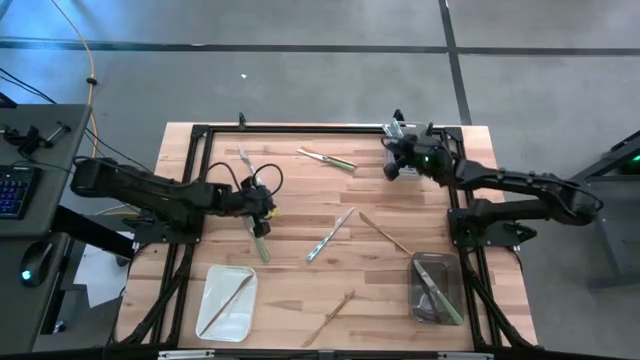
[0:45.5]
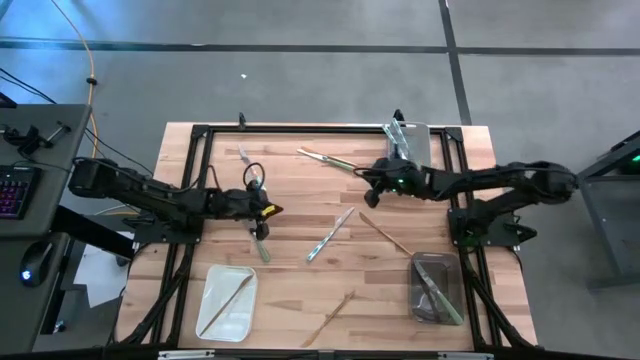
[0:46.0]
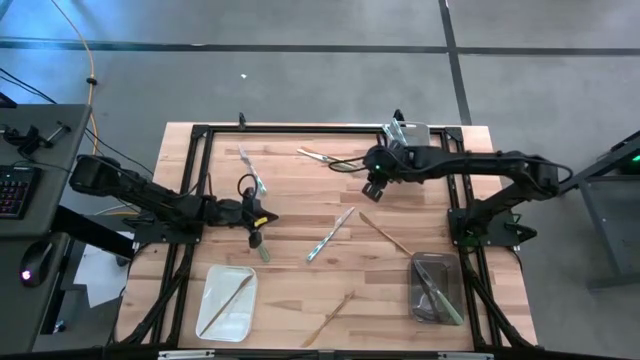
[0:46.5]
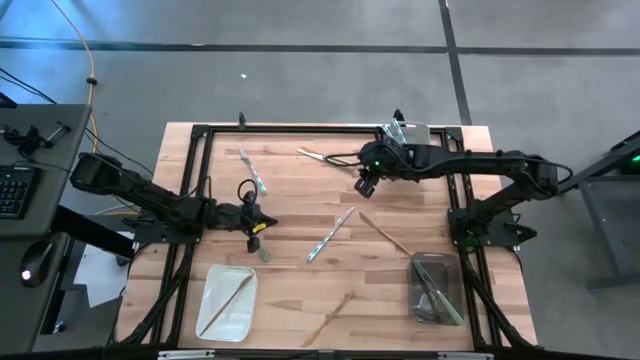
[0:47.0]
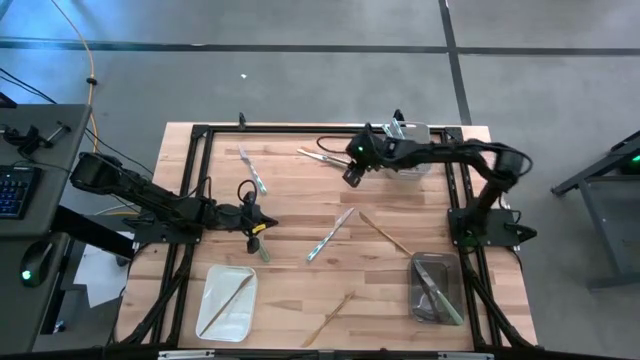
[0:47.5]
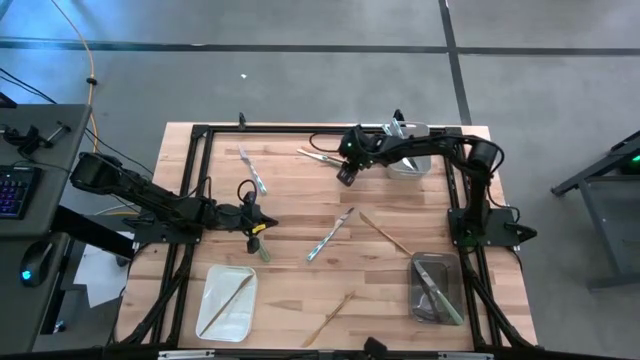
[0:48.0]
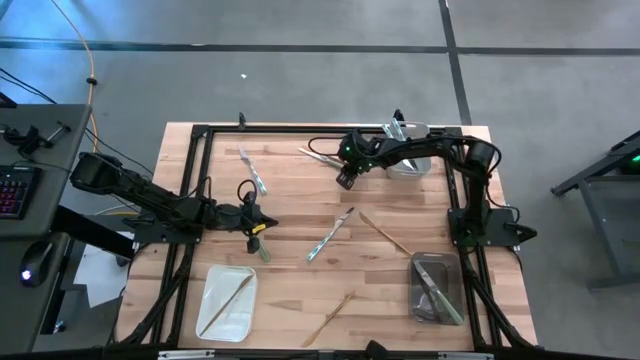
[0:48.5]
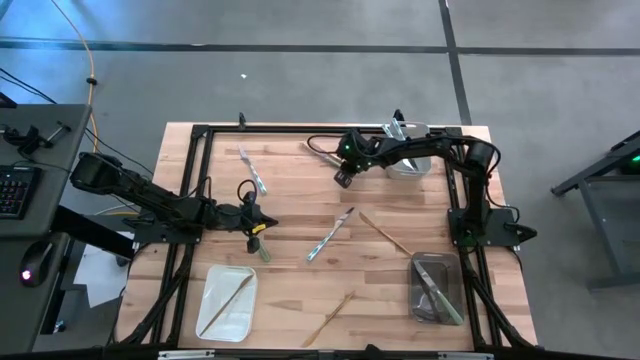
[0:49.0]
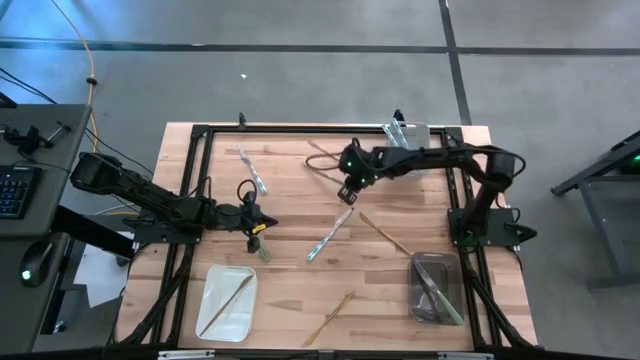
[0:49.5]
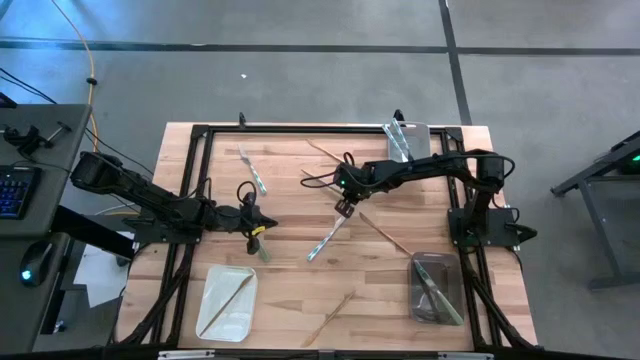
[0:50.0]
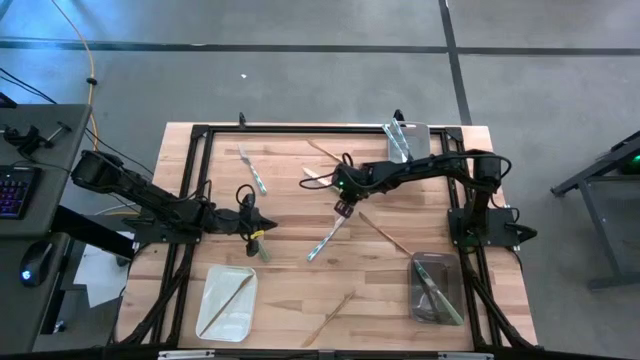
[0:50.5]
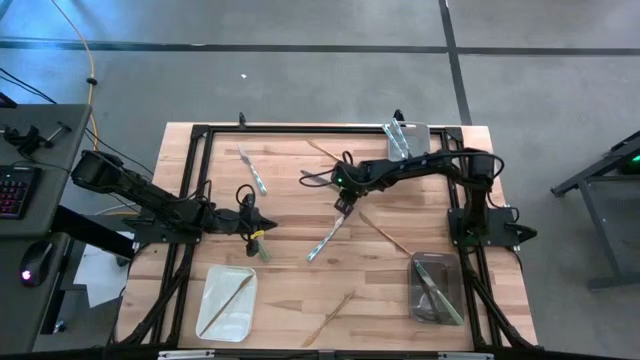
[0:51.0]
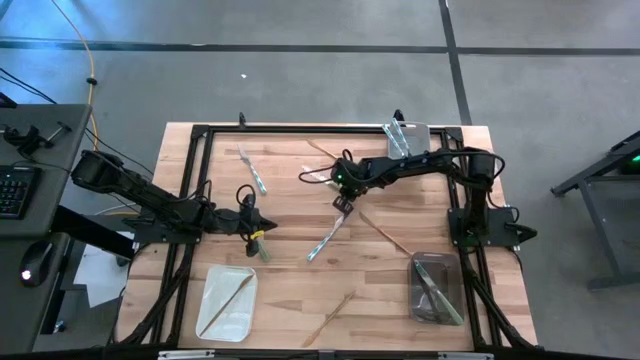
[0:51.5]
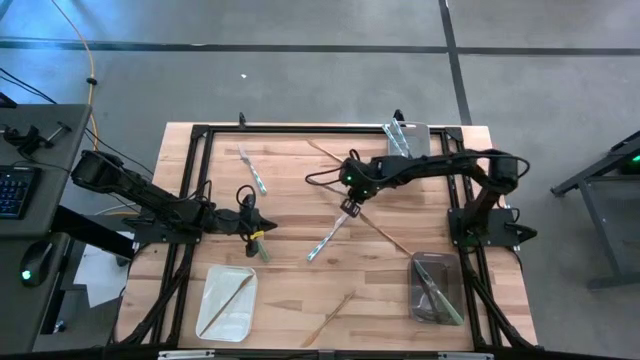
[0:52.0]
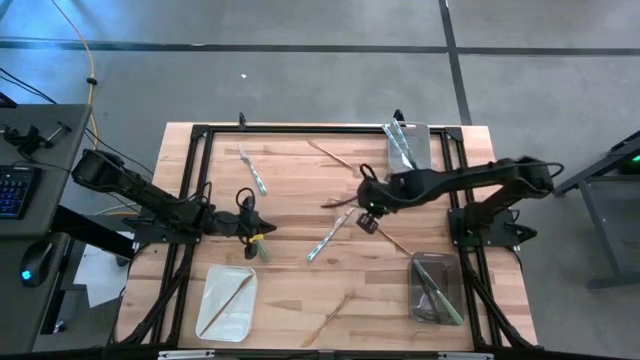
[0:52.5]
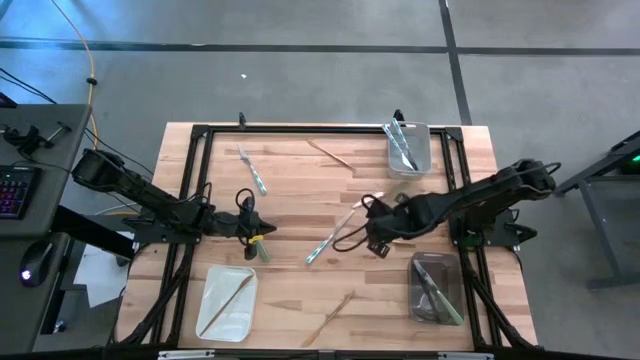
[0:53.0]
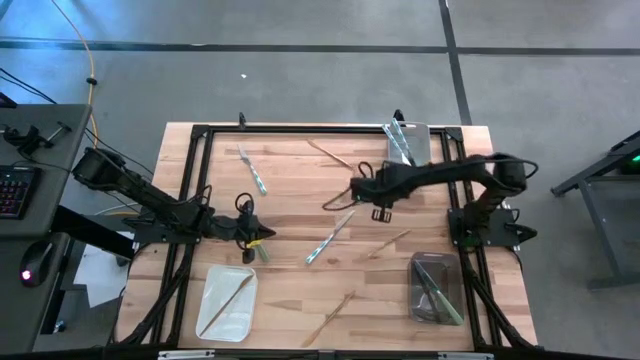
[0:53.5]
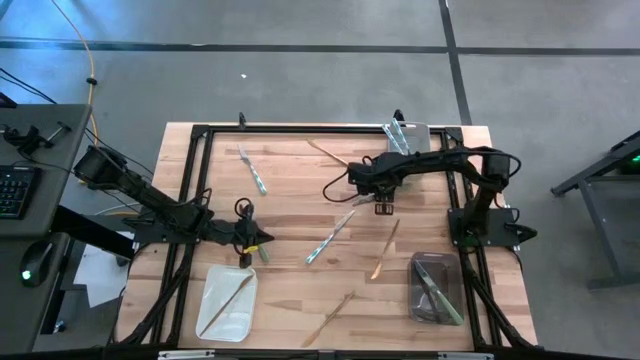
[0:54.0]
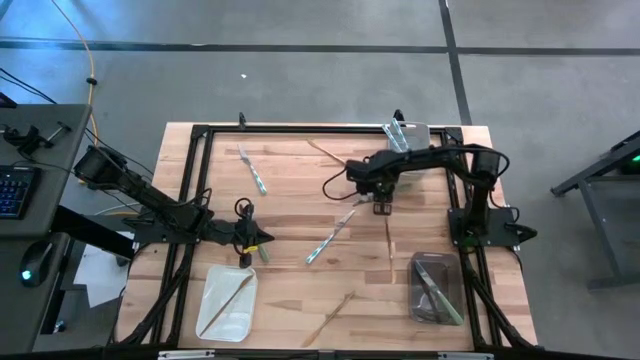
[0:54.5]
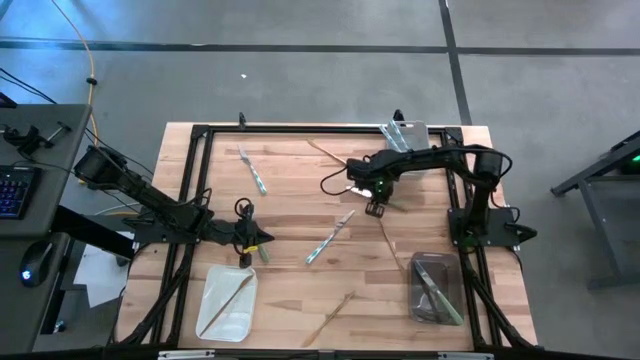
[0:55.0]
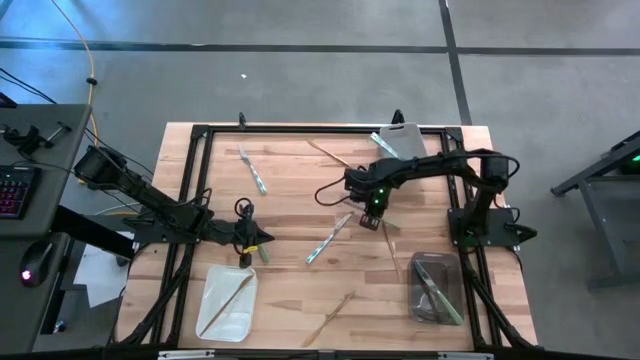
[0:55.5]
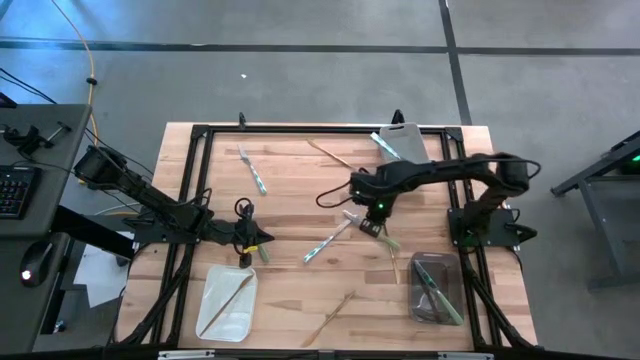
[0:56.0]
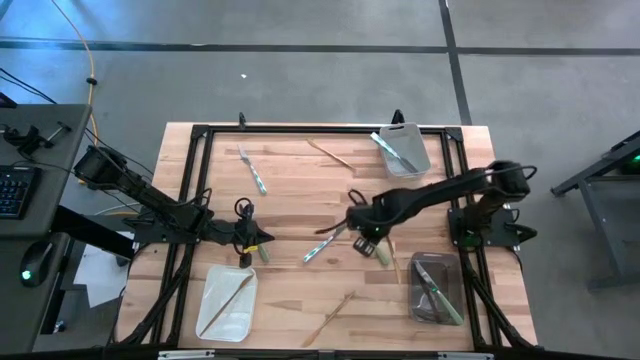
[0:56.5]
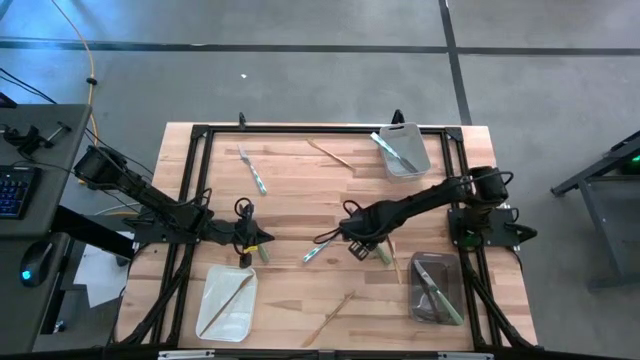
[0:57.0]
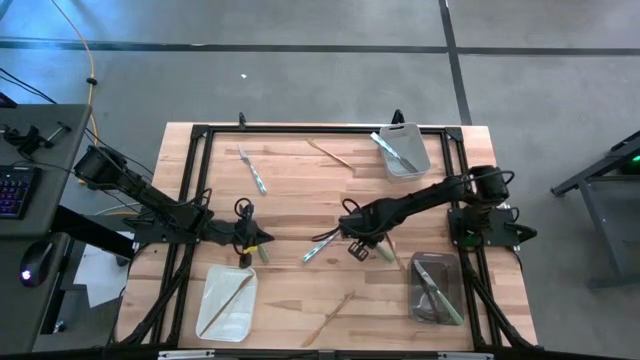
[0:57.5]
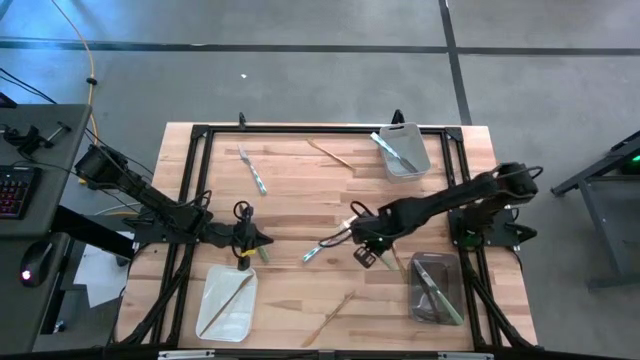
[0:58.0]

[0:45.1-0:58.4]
Task: Sort silverware by color (type)
Put the green table knife into the black bin

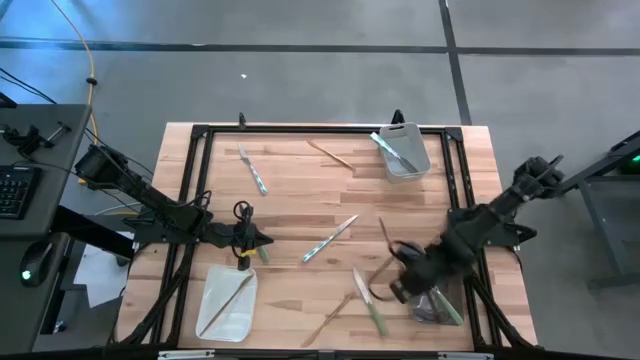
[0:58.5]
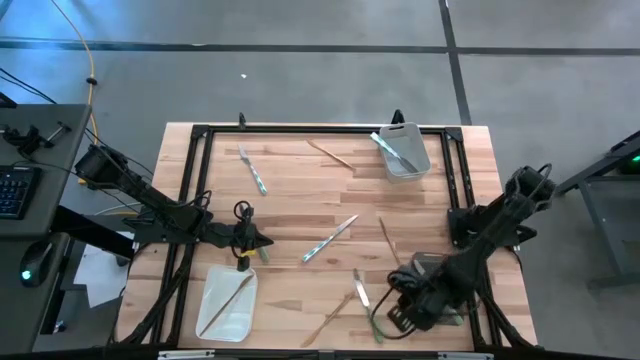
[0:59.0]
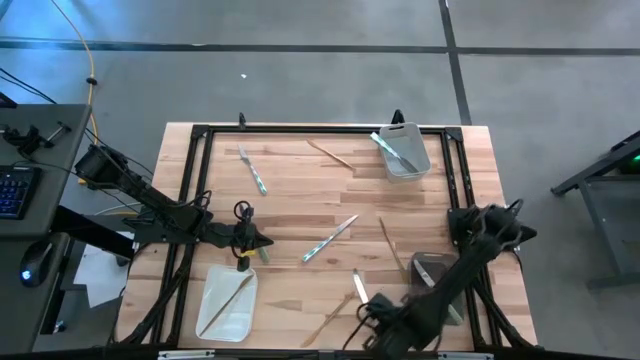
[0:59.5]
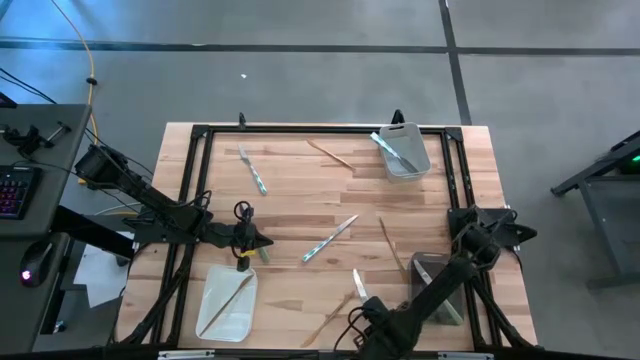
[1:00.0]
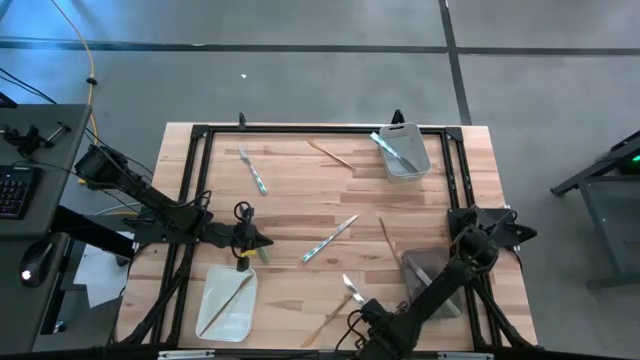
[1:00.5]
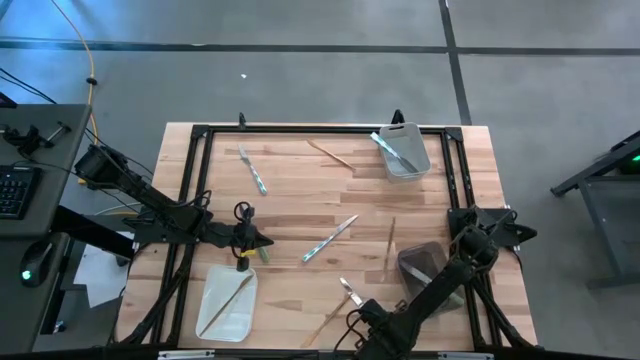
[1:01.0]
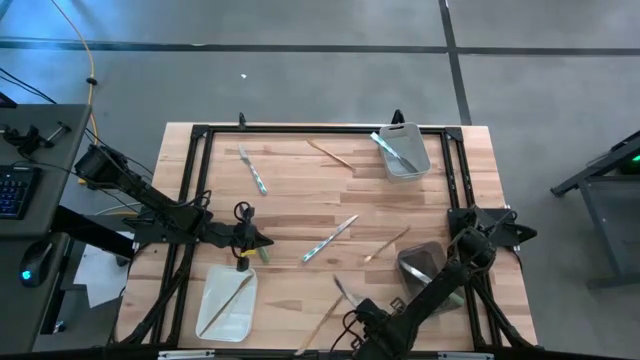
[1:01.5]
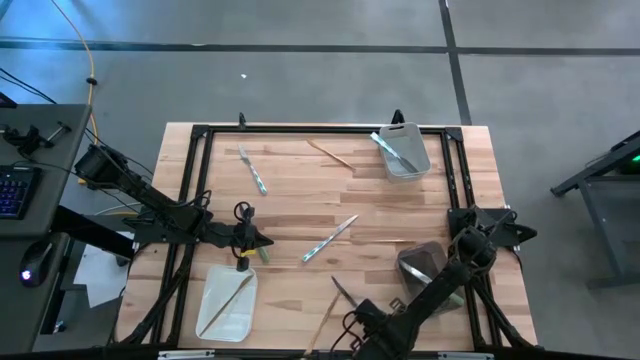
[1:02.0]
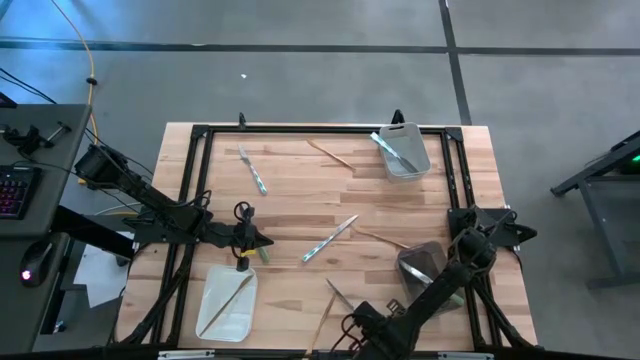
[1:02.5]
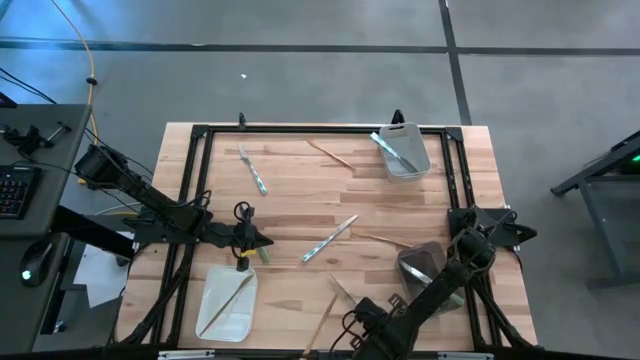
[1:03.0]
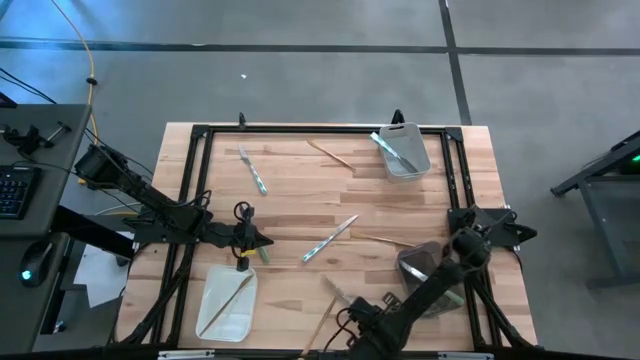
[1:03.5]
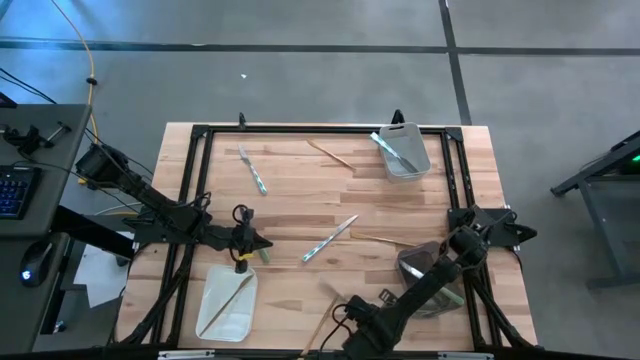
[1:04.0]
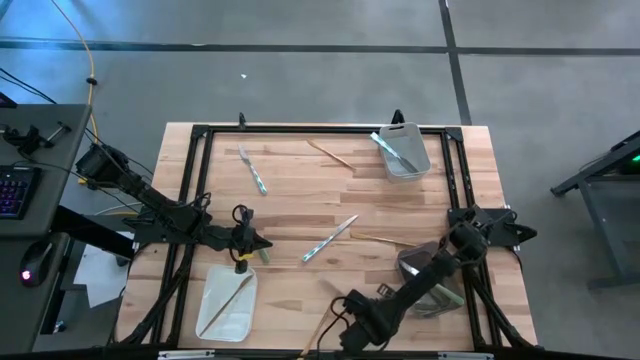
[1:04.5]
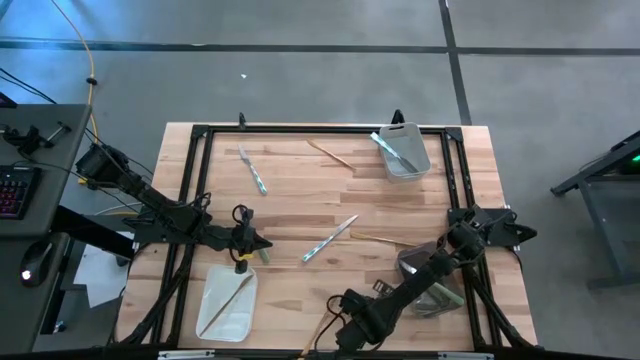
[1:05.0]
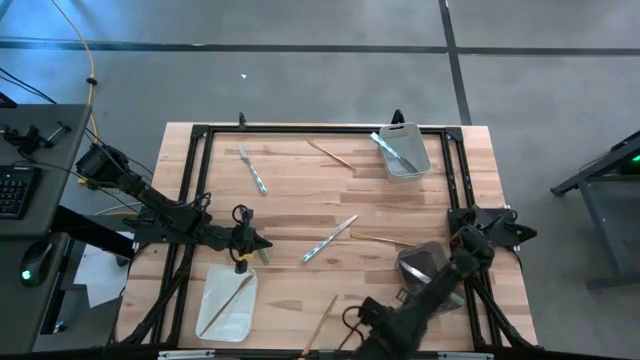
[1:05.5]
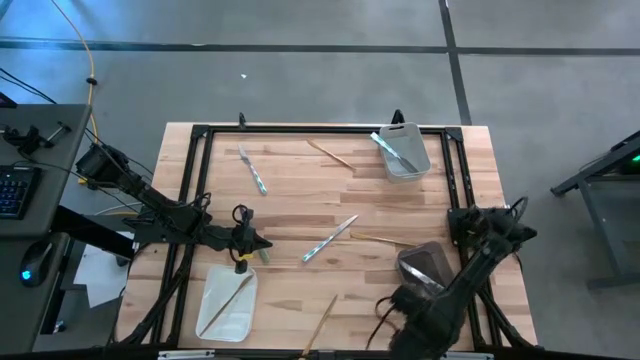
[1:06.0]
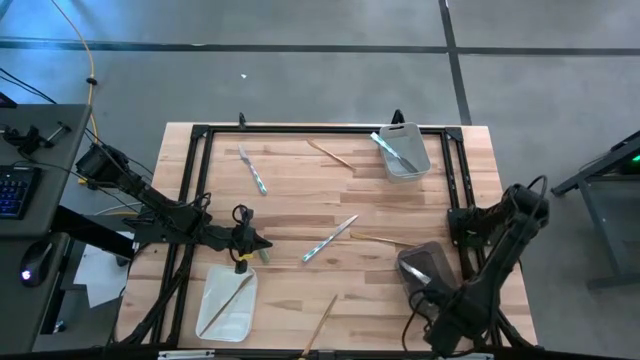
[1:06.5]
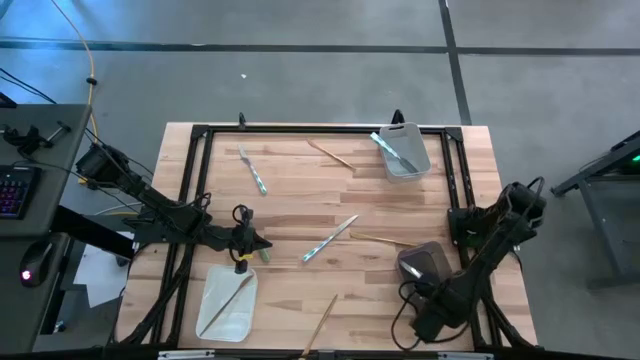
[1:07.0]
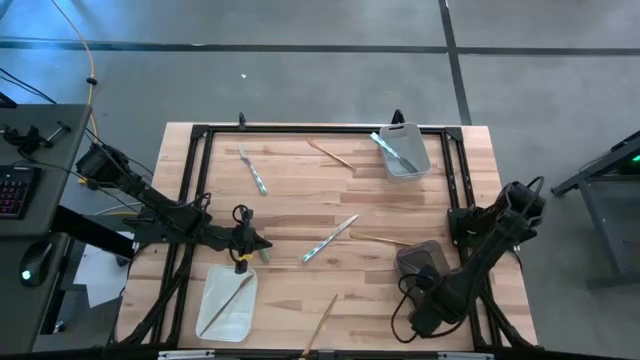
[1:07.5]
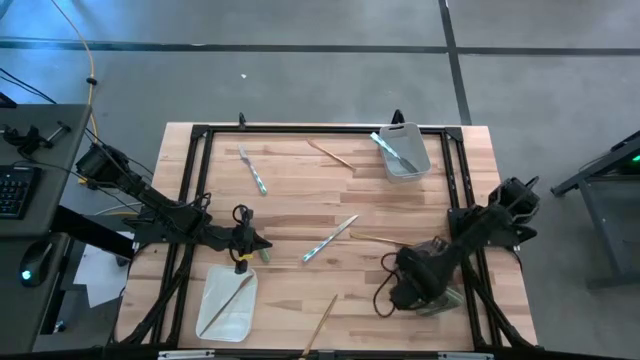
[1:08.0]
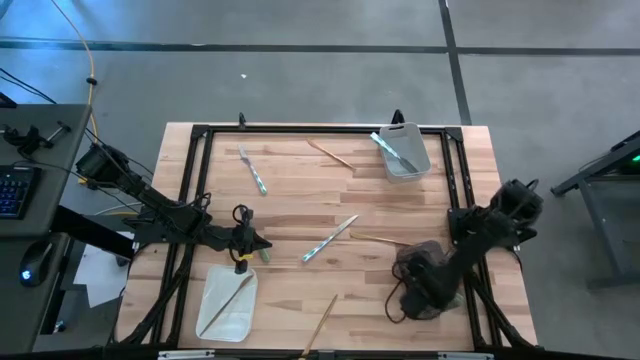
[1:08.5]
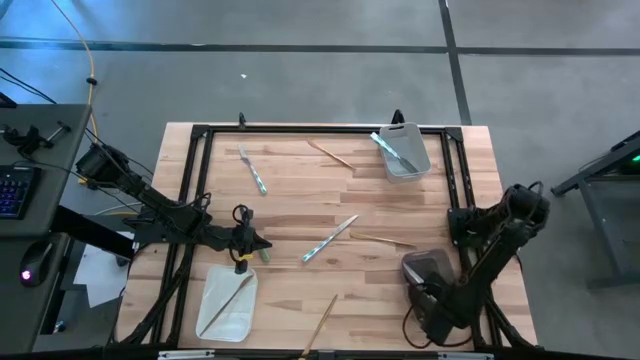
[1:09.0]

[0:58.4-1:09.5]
Put the green table knife into the black bin
